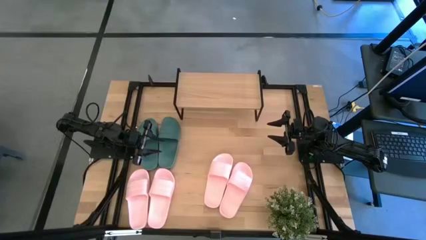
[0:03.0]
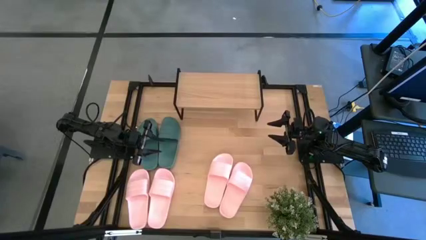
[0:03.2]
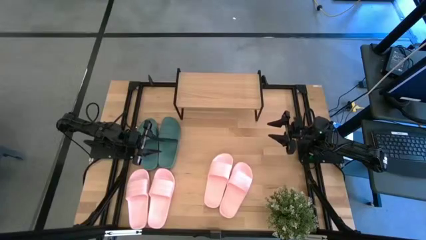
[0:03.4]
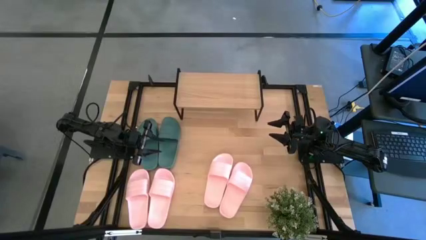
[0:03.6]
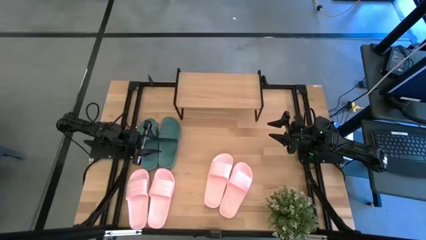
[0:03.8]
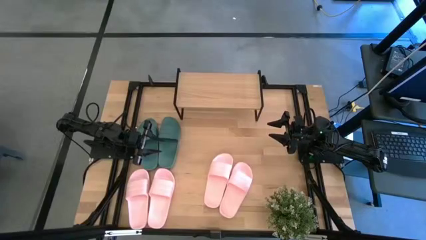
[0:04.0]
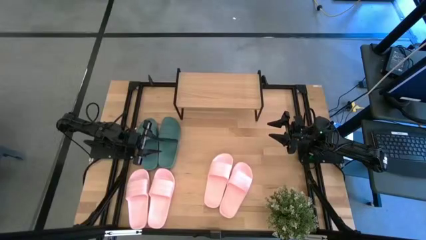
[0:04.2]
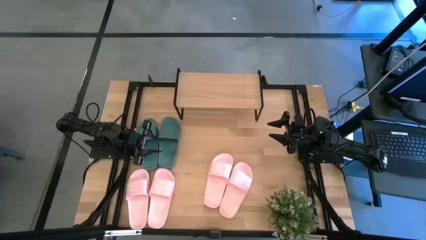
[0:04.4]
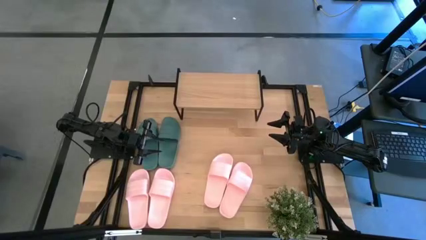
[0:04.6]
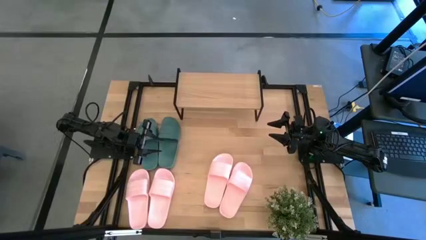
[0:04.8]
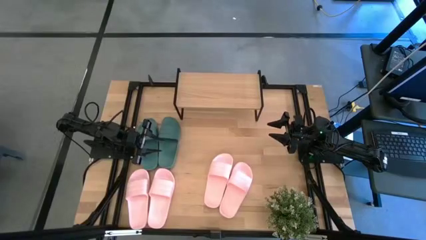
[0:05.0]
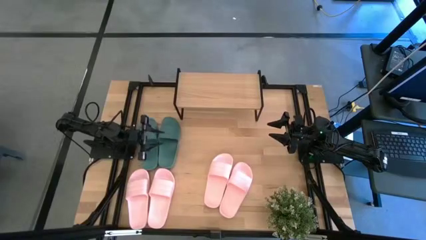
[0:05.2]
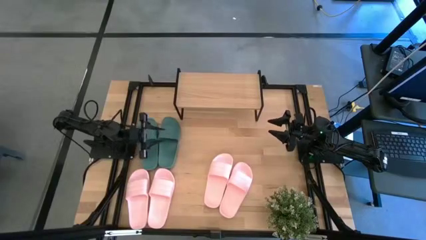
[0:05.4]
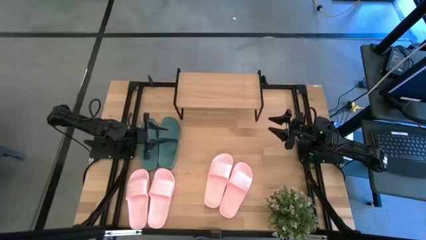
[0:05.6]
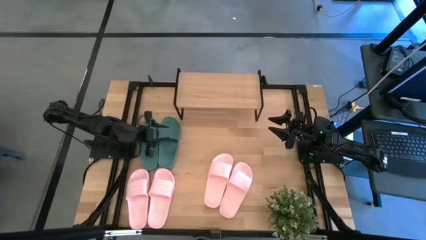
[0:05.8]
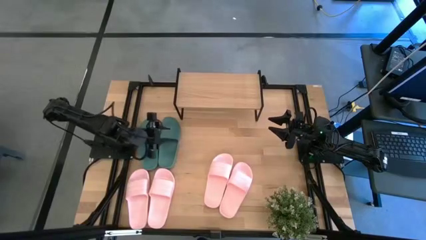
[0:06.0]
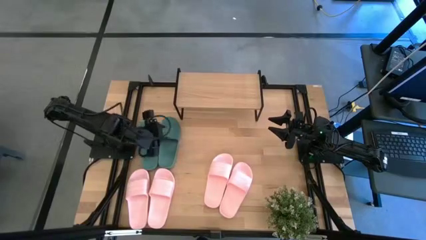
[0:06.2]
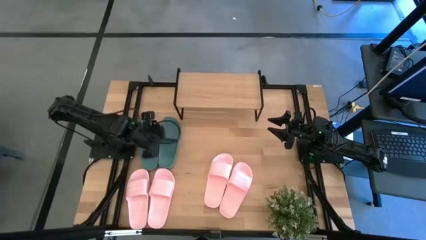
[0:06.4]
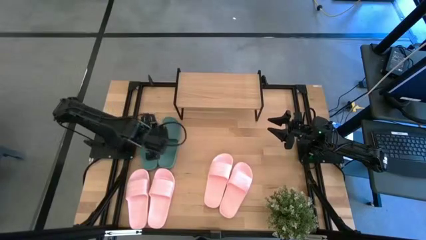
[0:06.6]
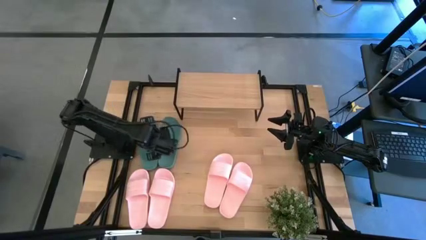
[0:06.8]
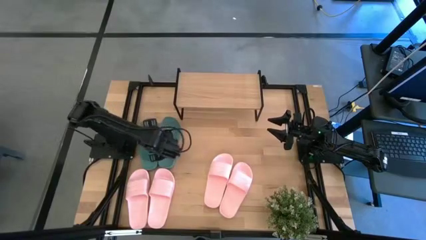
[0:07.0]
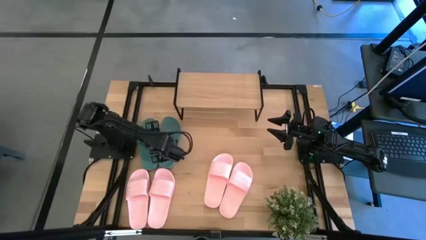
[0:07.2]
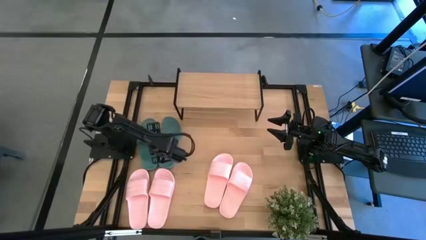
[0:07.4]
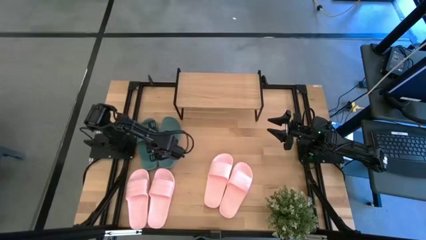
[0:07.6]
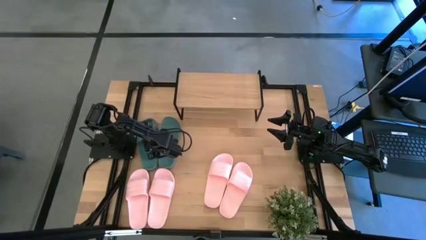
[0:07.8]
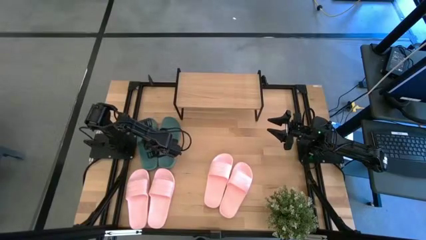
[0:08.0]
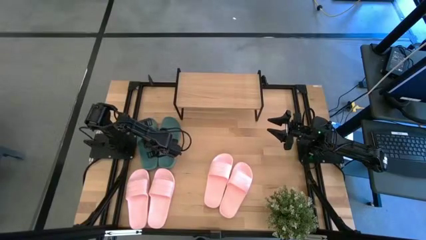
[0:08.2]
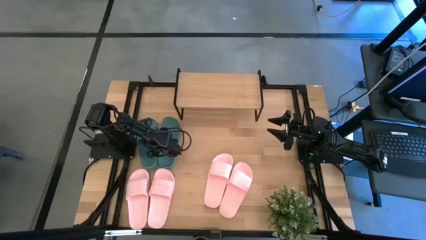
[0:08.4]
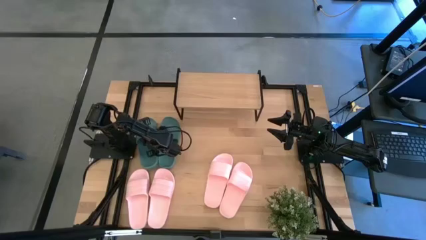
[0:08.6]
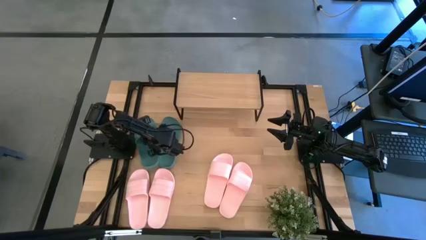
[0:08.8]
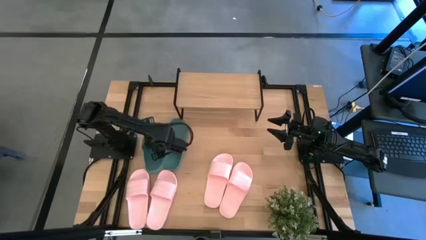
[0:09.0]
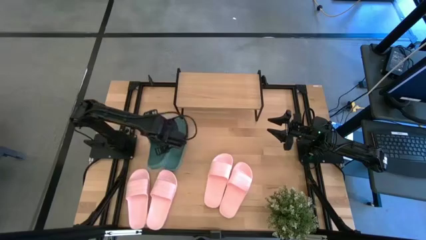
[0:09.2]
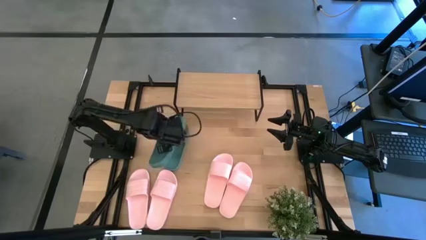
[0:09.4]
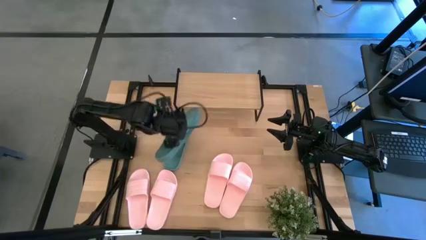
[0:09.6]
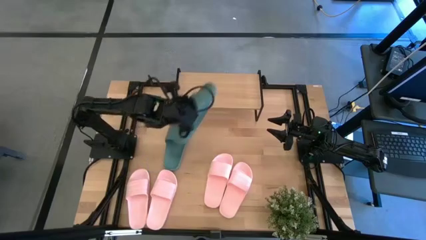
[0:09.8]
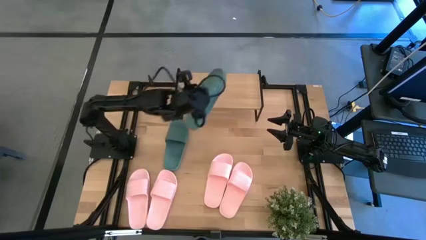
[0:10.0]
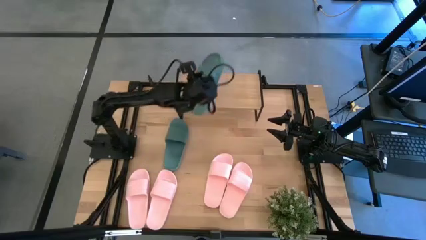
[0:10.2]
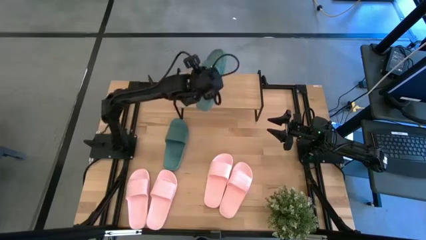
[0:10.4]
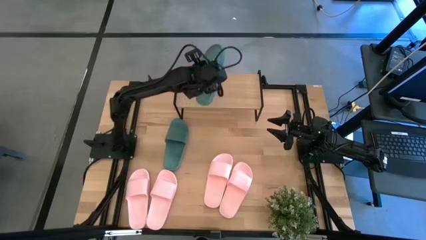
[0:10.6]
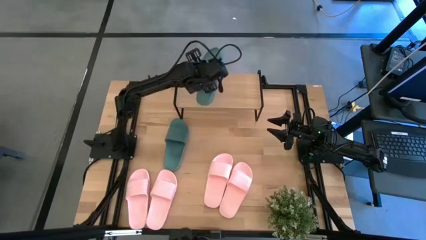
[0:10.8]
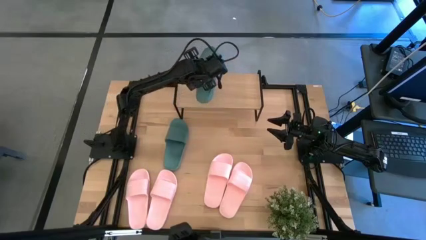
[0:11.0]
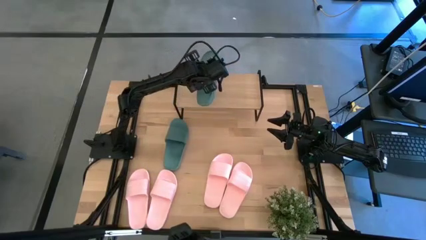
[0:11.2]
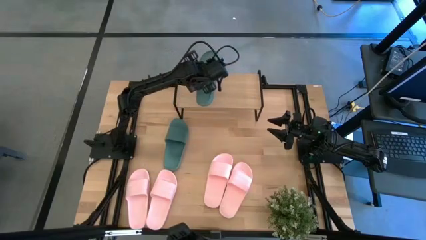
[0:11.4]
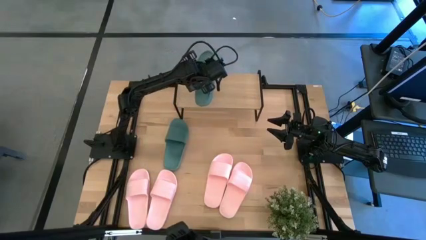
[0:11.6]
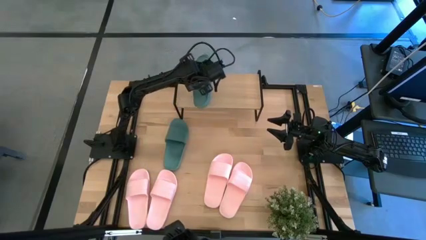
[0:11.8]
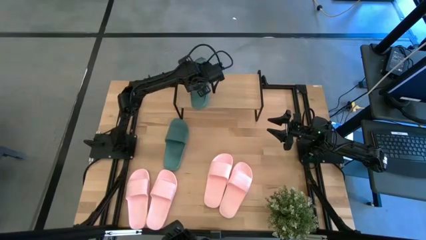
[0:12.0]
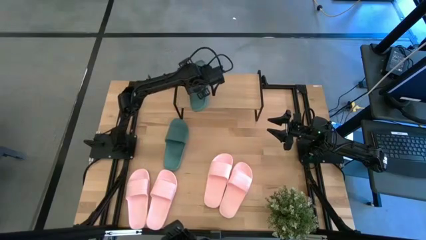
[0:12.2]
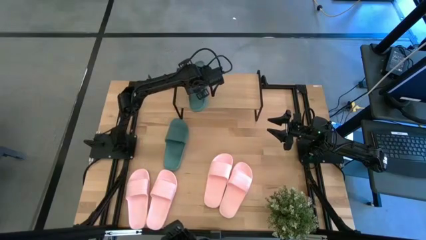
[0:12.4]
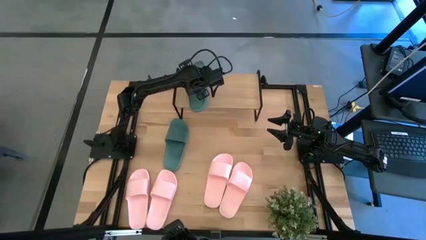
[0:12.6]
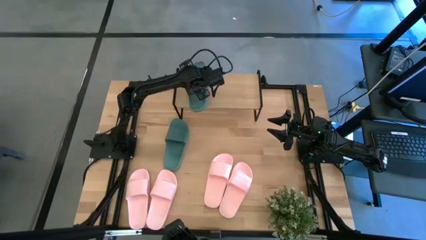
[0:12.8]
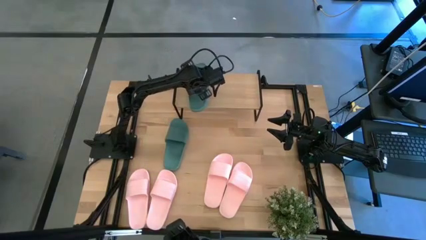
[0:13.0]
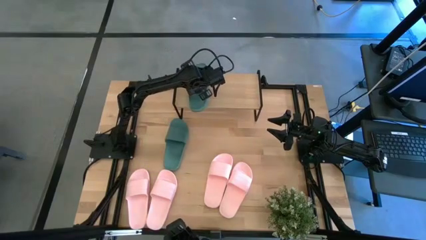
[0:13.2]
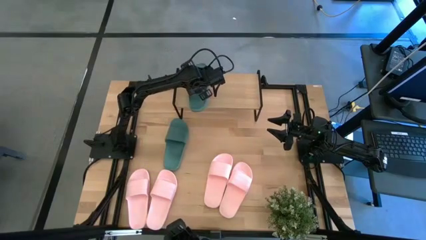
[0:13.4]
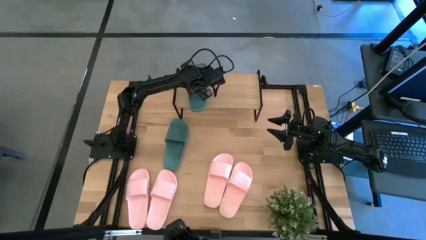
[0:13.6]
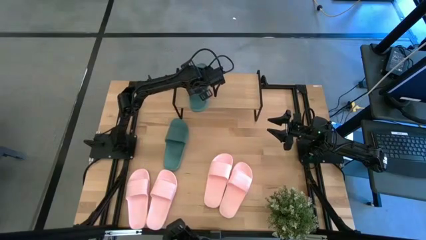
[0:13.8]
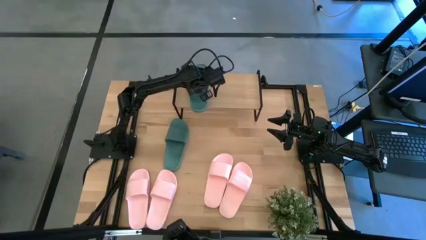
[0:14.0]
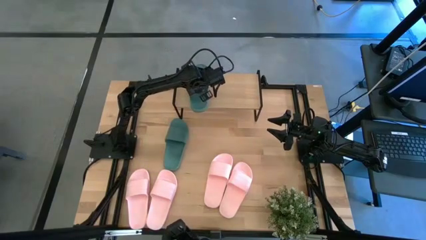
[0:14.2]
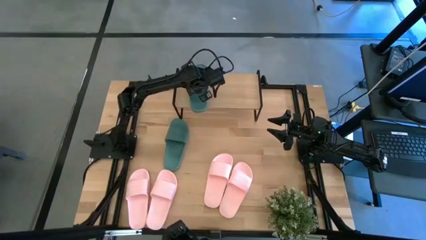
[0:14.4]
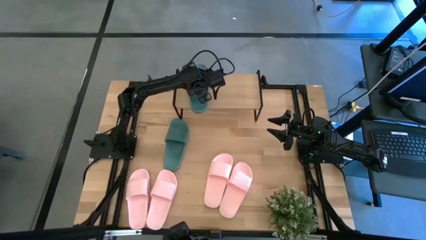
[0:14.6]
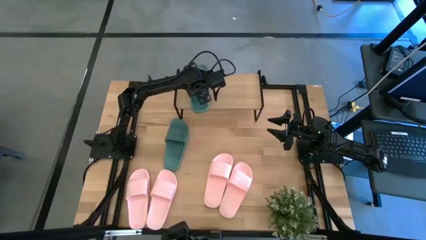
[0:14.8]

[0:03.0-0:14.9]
Task: Pick and place slides into the shelf
Put the green slide on the shelf
